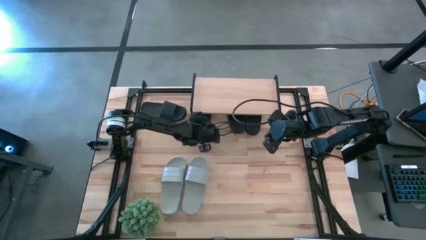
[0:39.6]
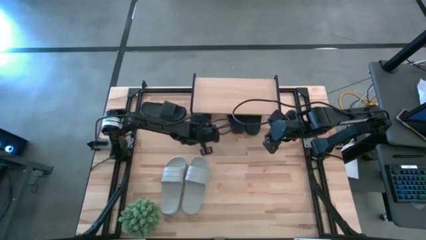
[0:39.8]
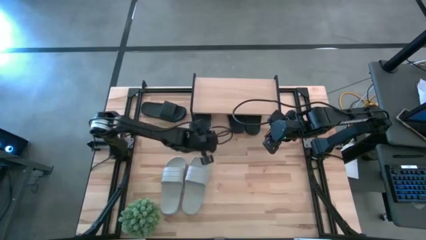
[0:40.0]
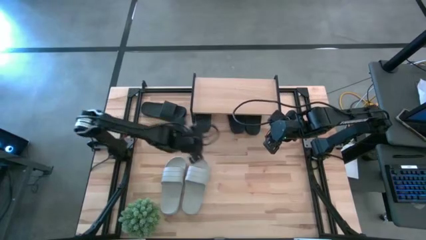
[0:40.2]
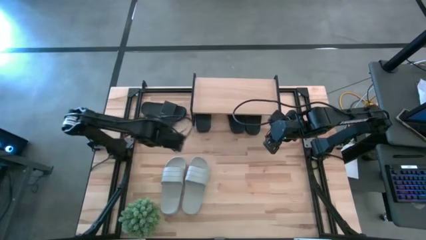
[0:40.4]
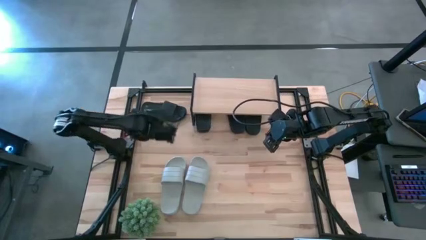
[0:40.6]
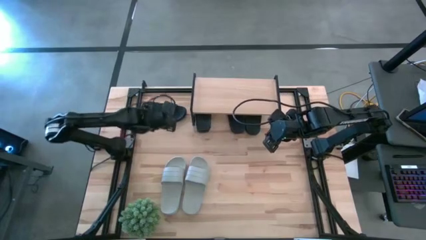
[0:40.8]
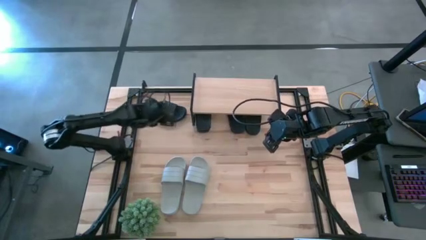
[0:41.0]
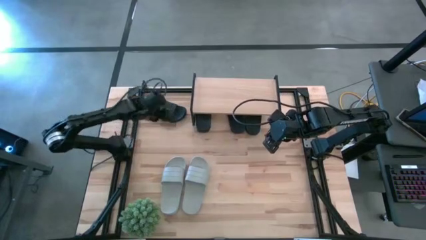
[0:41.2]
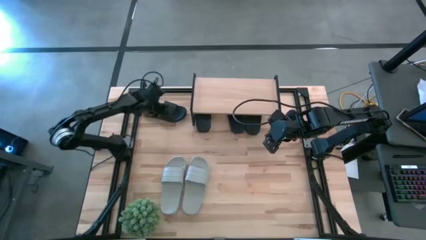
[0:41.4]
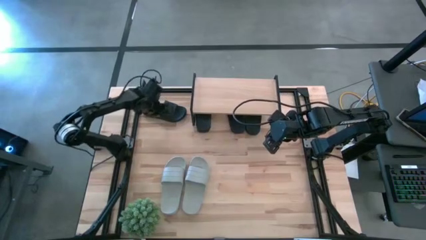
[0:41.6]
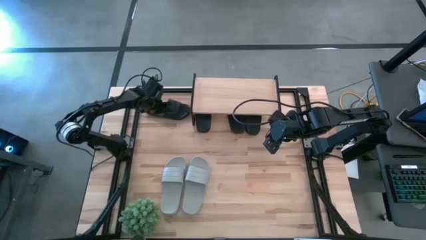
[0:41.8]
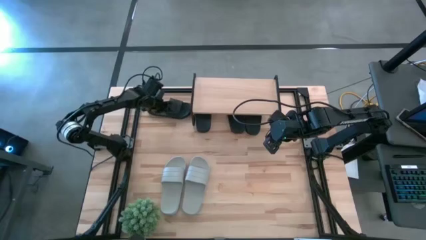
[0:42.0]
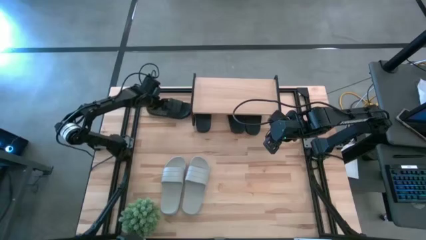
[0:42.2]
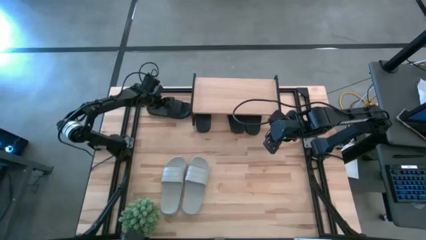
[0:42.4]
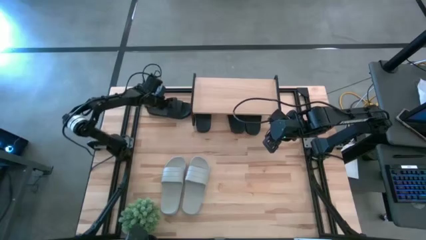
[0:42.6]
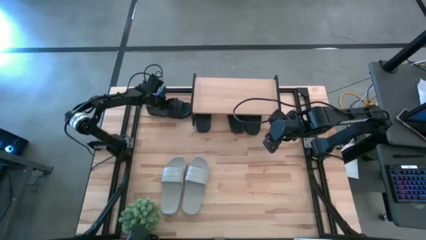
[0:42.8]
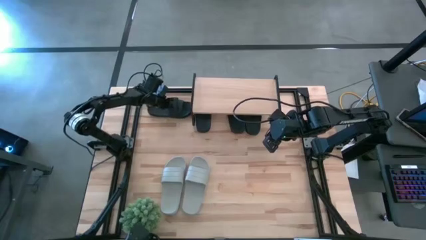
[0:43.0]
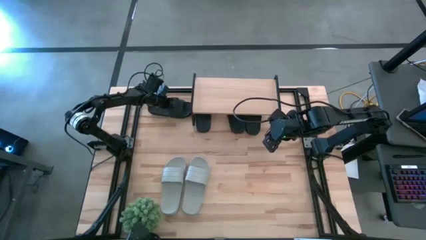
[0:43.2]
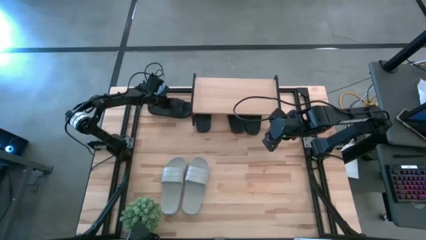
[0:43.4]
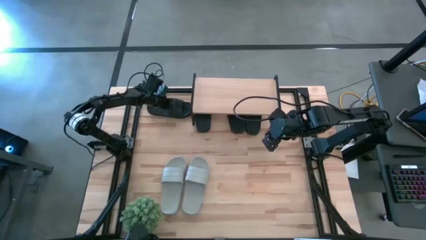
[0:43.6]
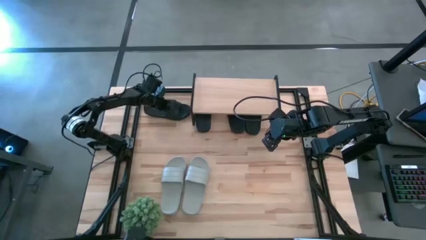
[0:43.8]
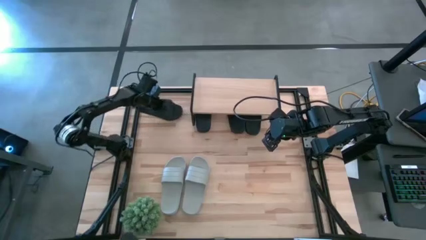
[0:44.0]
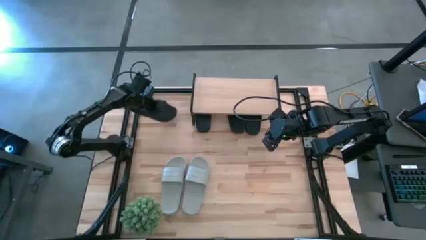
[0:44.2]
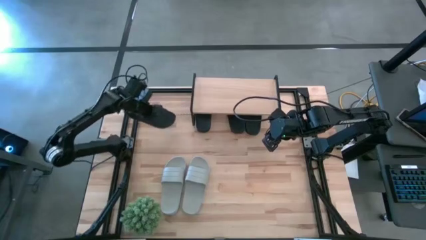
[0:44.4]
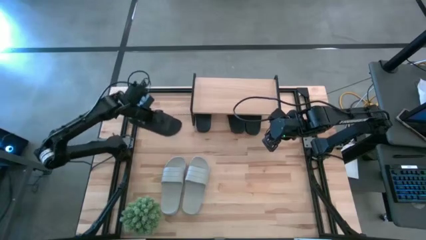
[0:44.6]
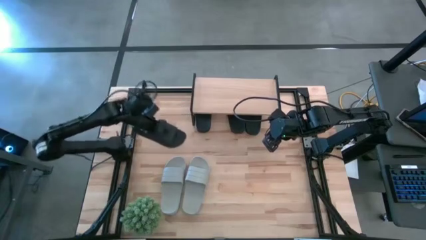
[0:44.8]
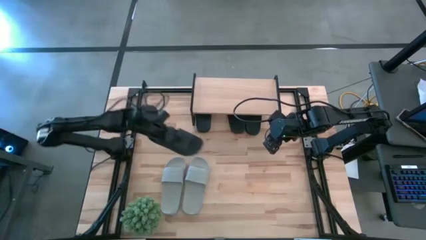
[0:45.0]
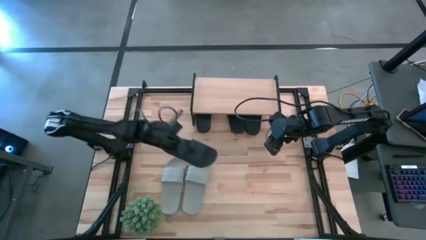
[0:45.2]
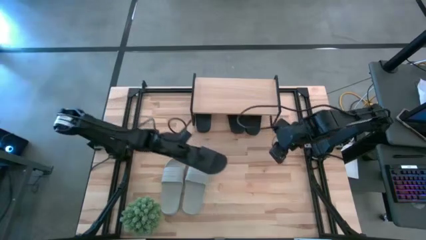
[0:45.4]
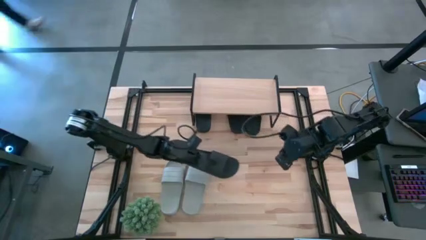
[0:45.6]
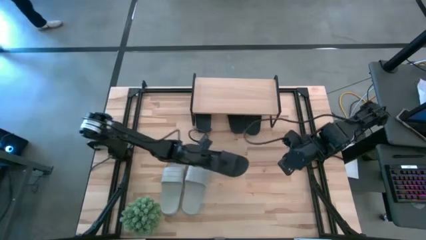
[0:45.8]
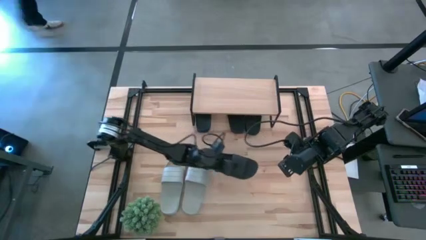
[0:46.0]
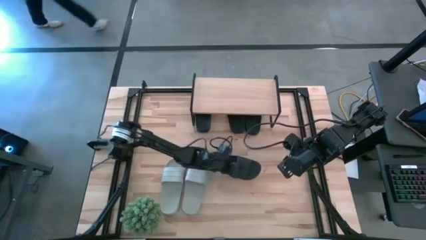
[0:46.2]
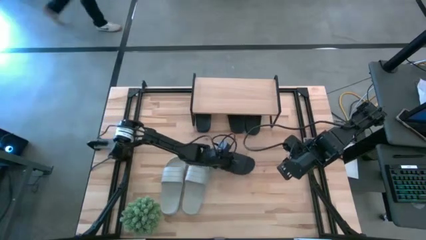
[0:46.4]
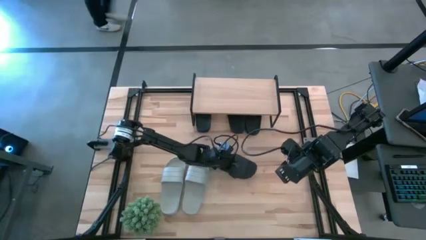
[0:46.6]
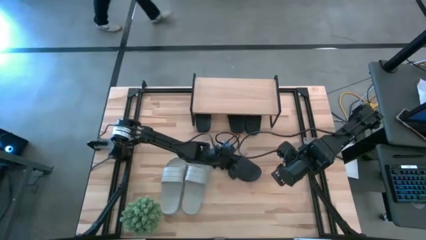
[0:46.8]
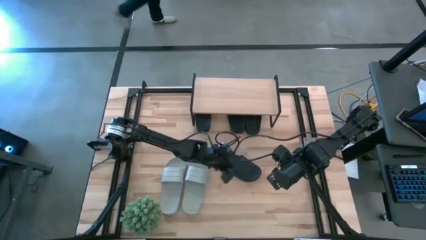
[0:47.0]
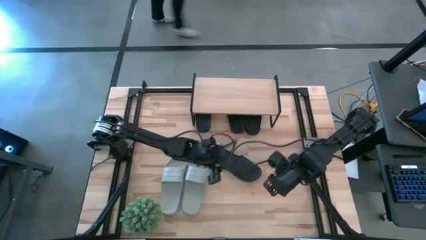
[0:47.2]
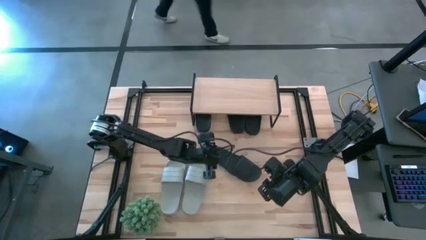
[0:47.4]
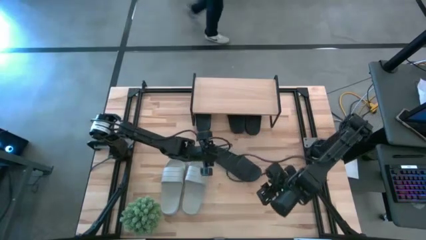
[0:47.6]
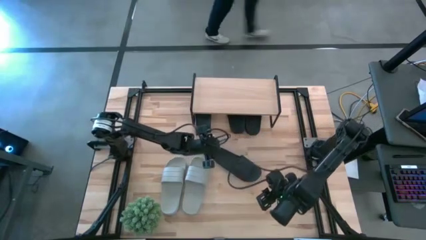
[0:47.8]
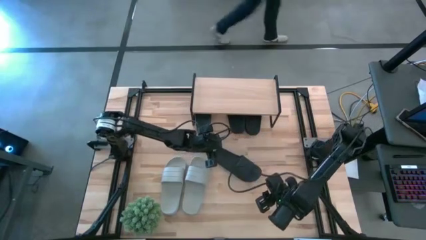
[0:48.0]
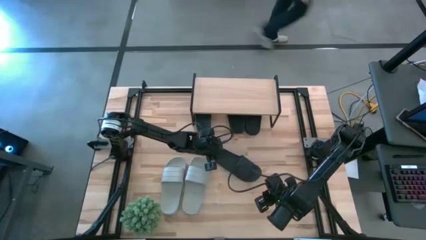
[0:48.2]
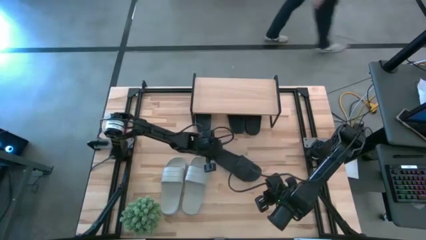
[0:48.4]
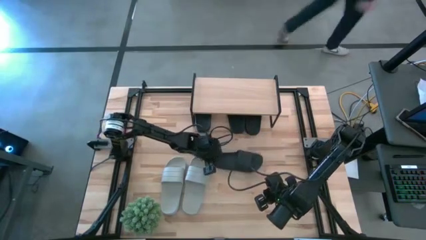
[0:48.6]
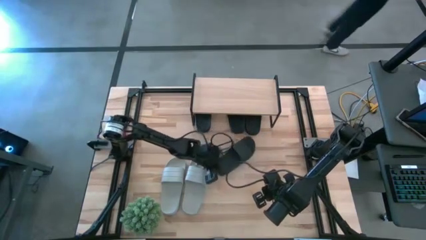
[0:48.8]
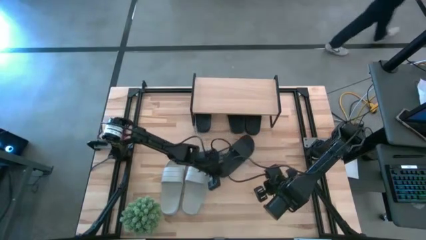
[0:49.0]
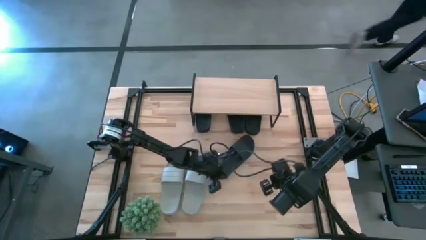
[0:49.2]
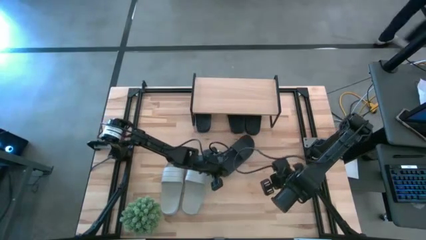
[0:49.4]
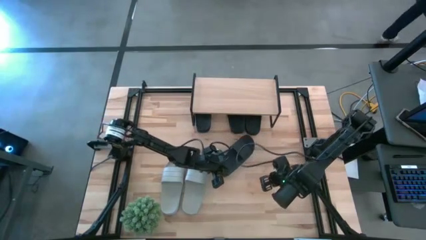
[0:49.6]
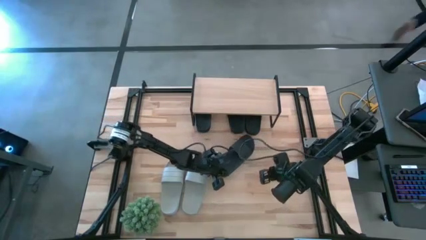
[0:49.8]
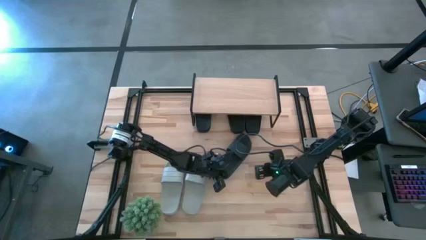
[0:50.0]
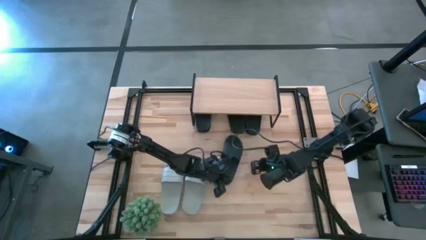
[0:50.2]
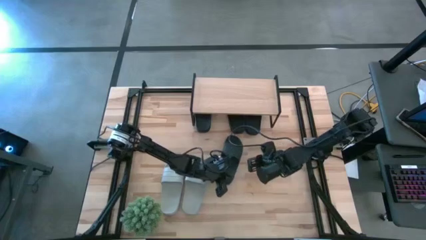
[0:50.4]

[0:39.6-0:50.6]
Task: Pick and place slides into the shelf
Put the black slide under the shelf
